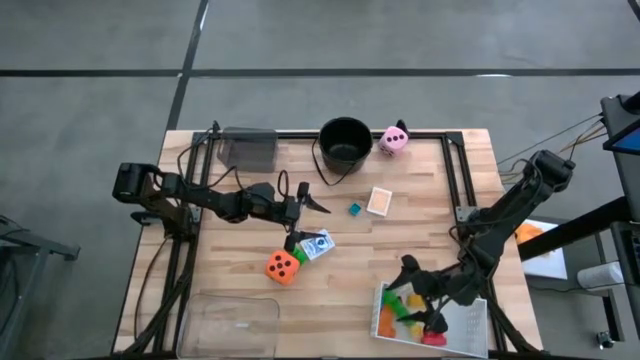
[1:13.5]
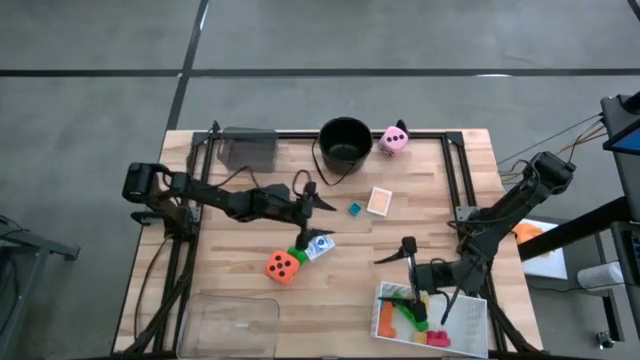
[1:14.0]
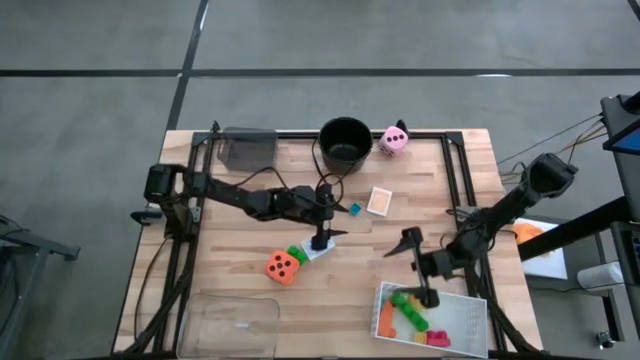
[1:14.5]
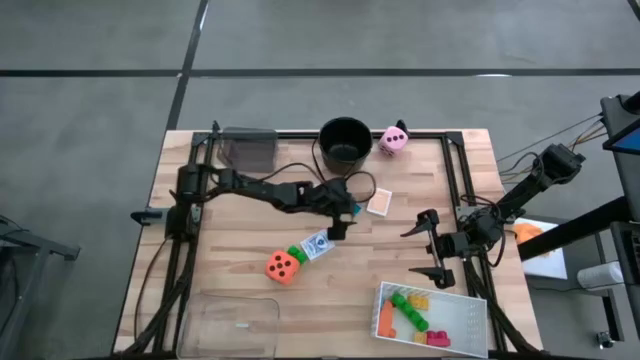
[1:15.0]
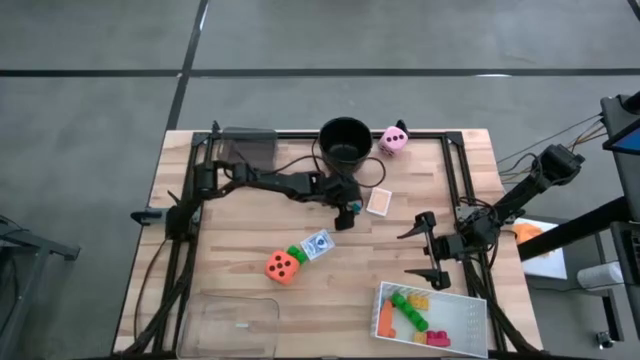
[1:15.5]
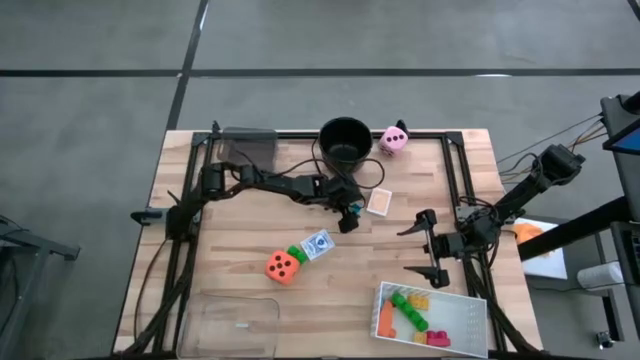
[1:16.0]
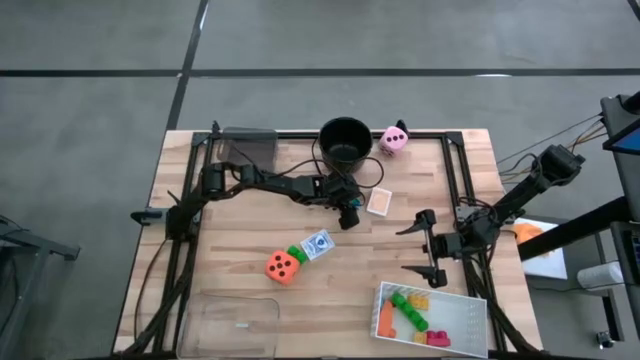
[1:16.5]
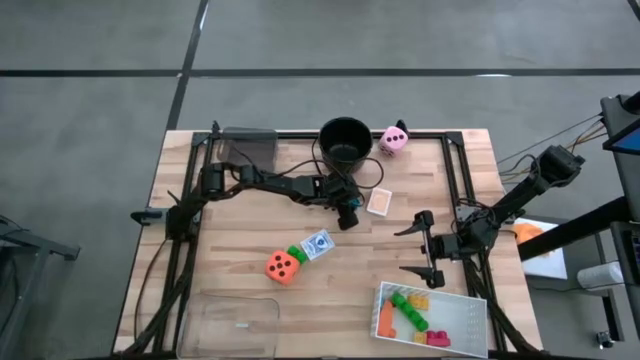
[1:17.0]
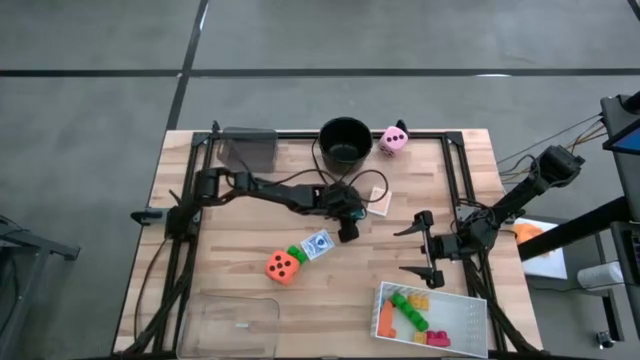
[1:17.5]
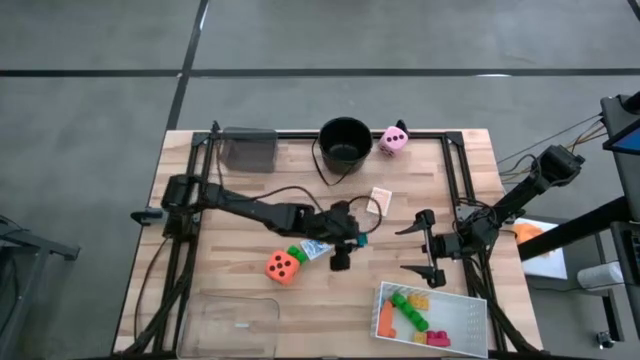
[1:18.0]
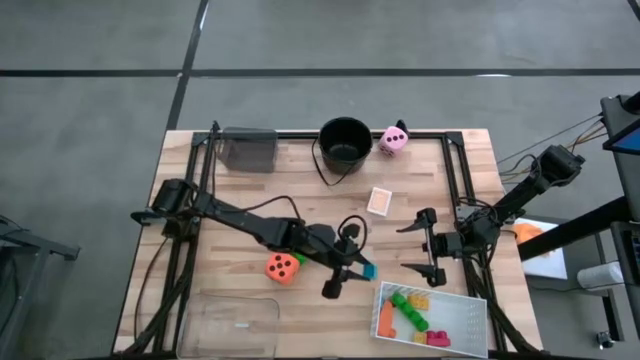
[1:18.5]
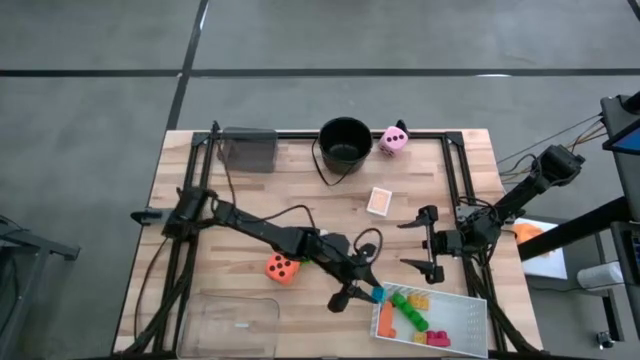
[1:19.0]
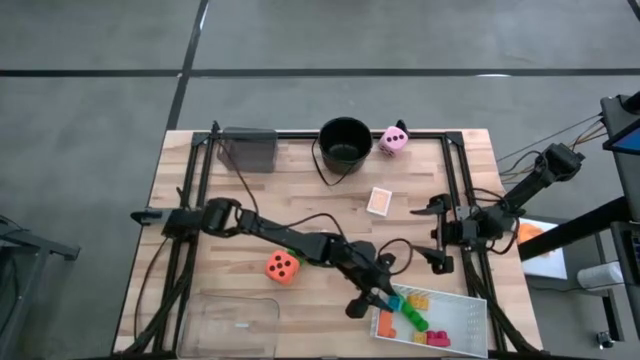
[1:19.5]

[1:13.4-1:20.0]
Task: Pick & Place Toys
Put the blue game piece into the white bin

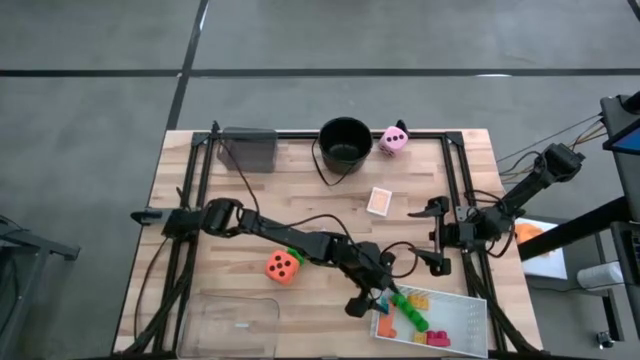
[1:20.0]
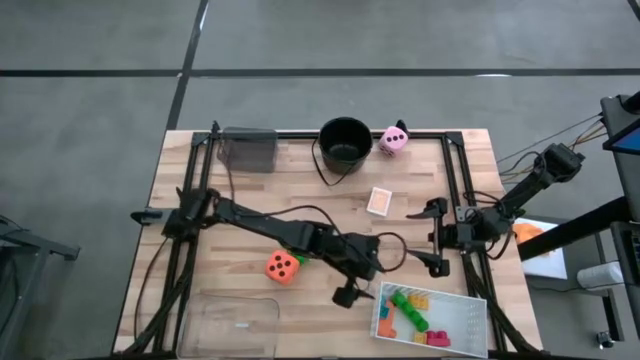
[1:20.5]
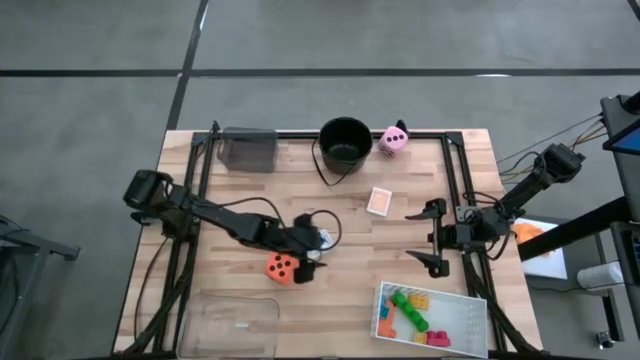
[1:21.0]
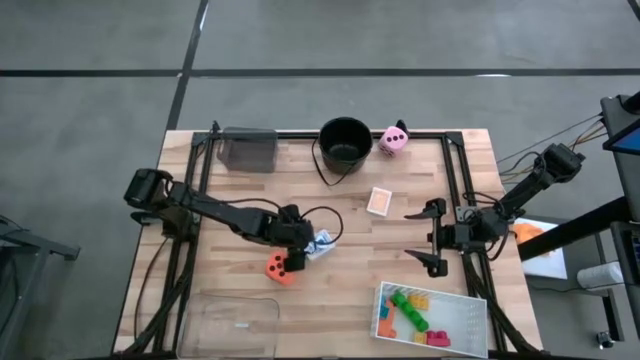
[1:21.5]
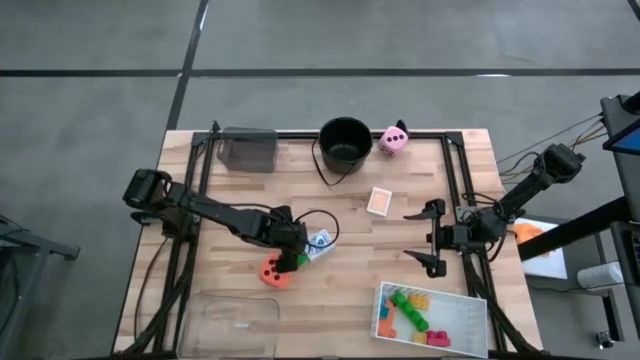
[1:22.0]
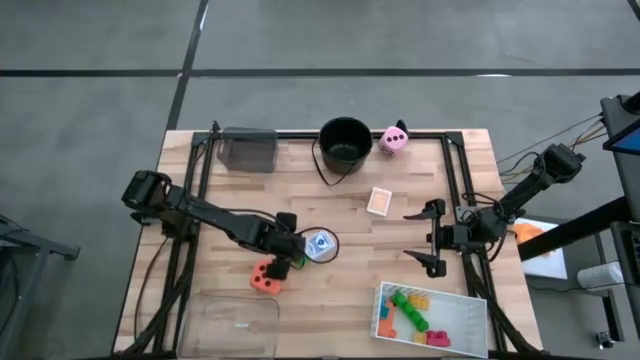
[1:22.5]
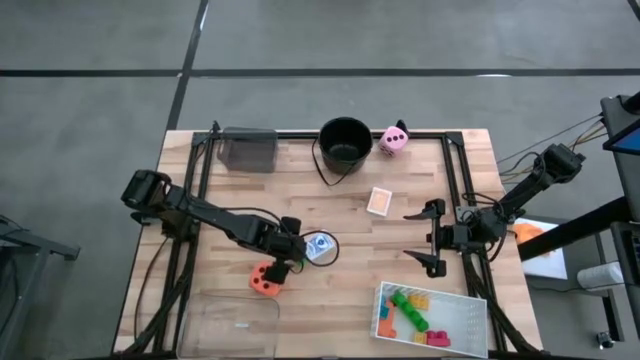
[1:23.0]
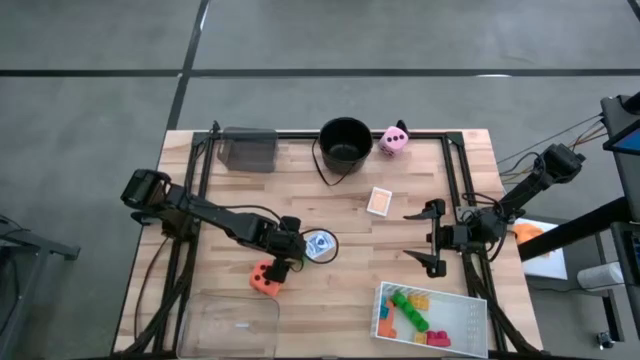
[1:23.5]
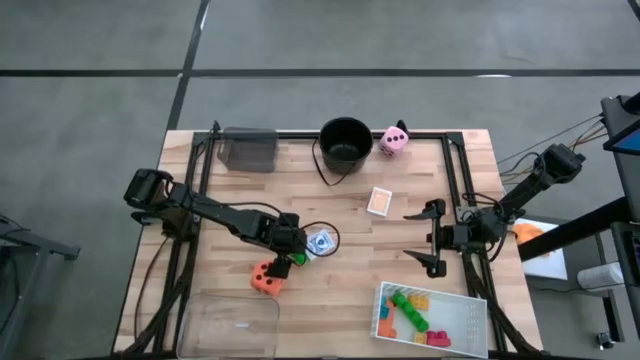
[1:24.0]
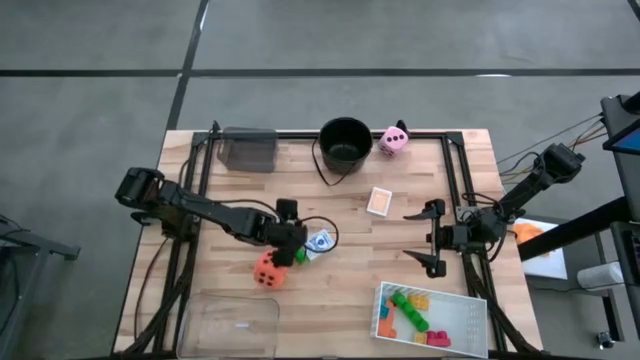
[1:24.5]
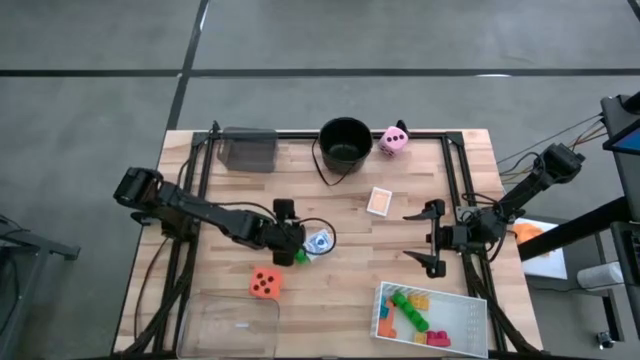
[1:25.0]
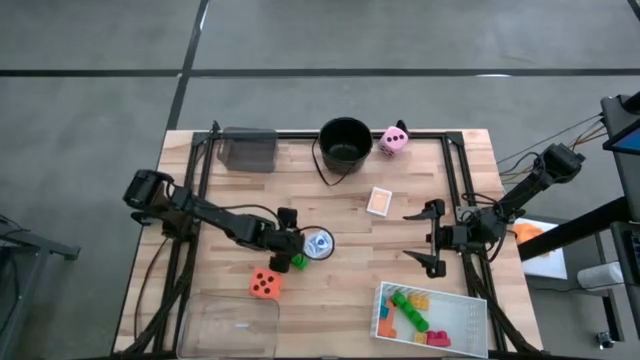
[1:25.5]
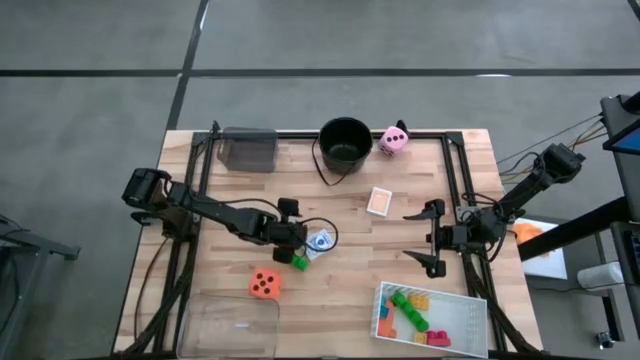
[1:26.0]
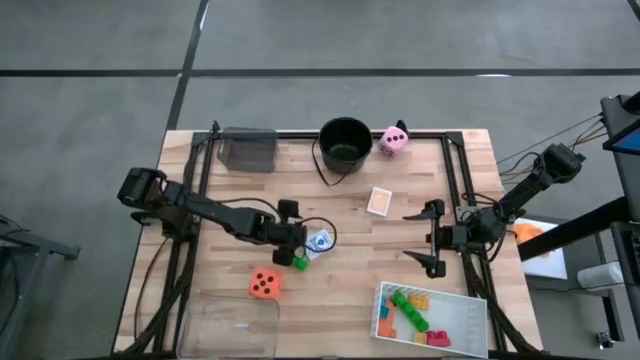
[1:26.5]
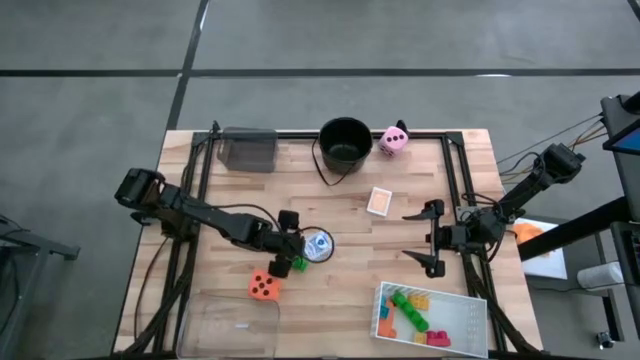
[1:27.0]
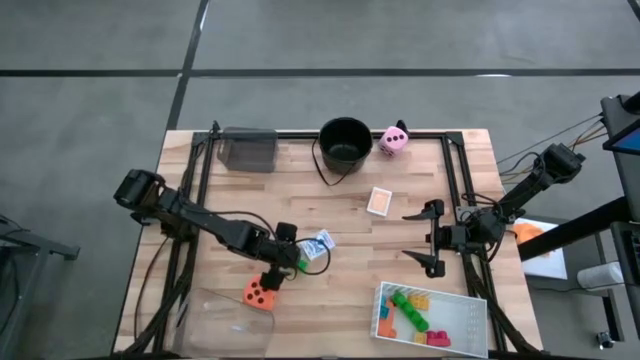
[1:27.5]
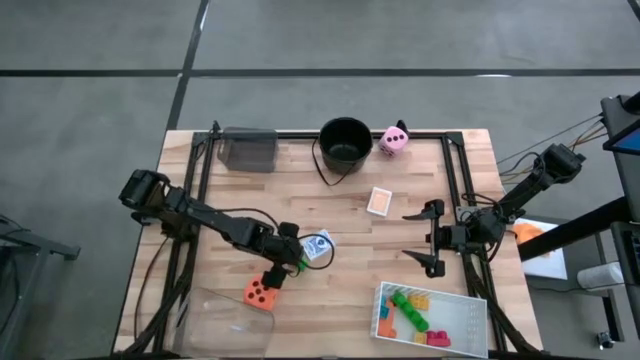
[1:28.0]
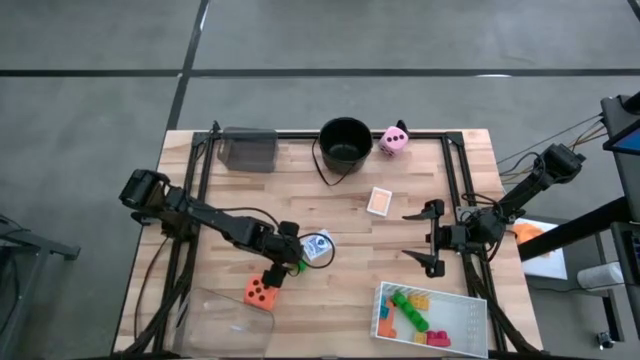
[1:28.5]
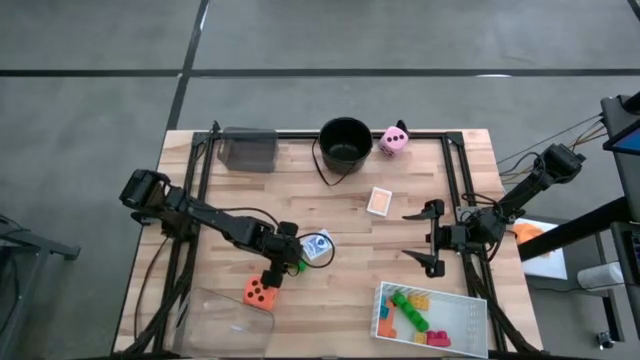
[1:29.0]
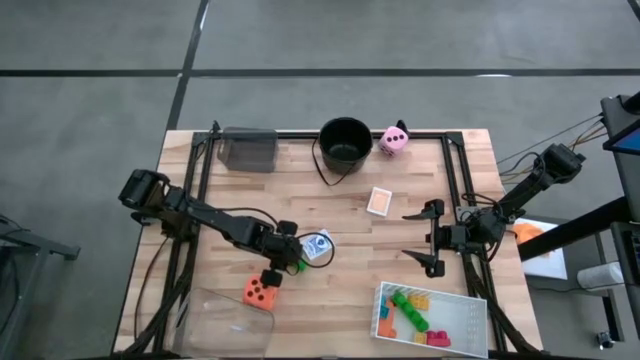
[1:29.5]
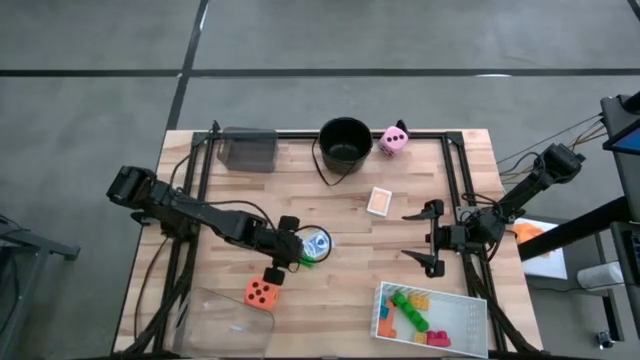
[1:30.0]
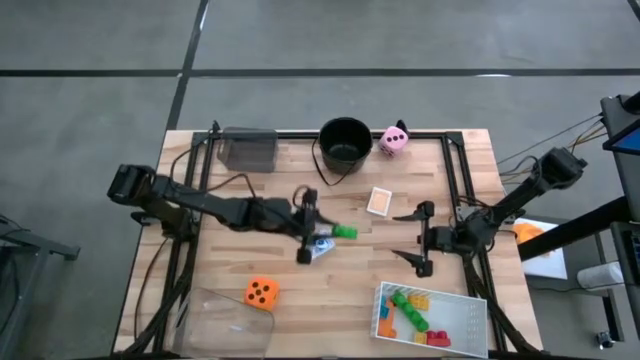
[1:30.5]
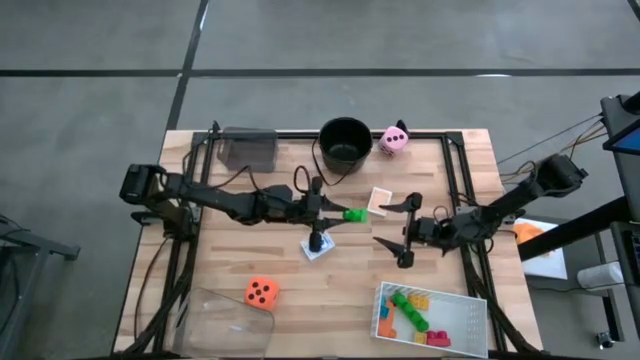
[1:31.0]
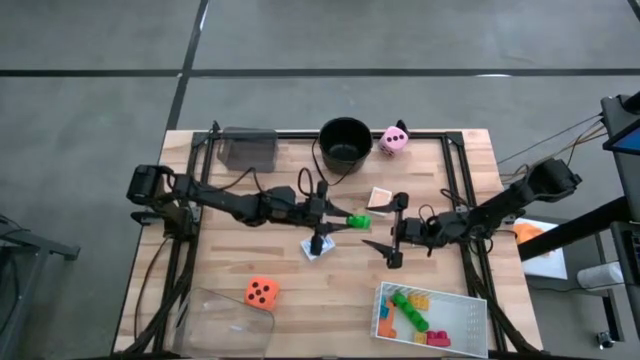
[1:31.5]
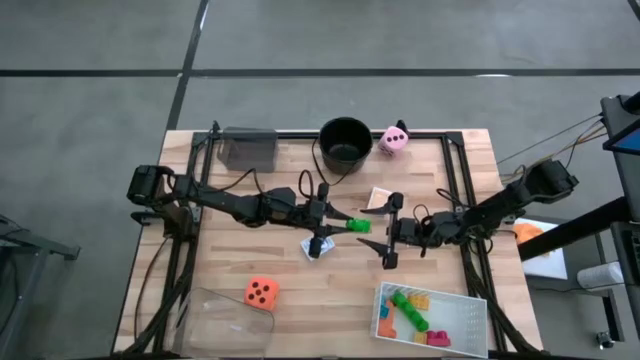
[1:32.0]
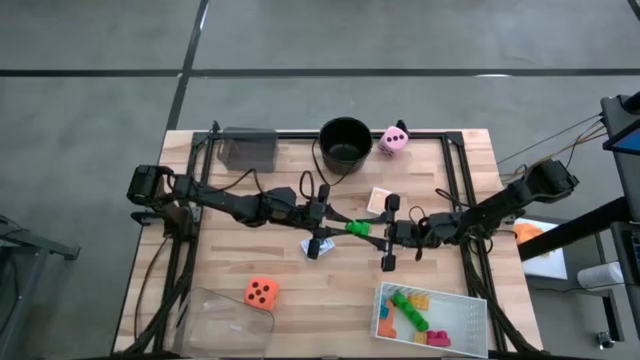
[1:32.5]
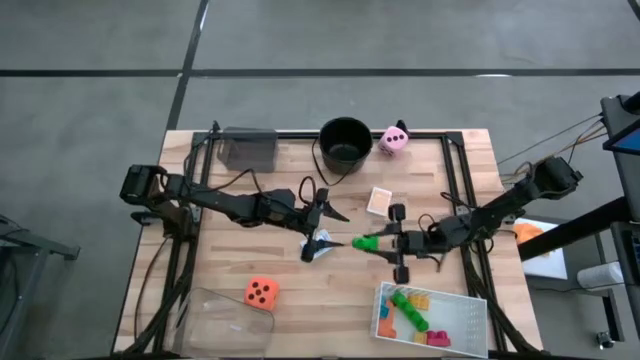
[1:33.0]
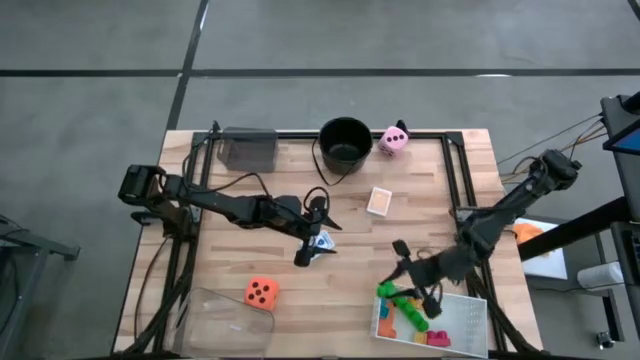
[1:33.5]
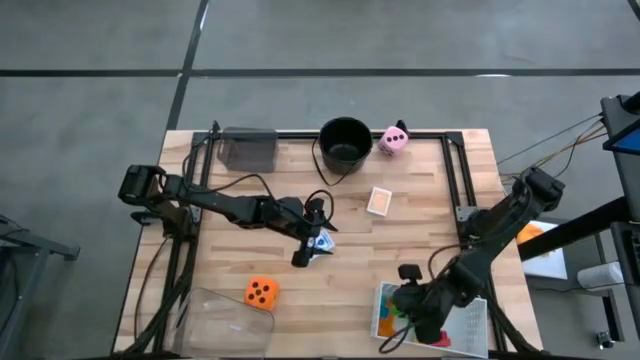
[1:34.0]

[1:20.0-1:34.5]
Put the green game piece into the white bin

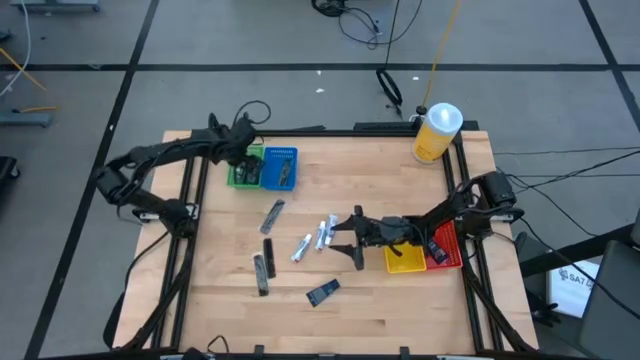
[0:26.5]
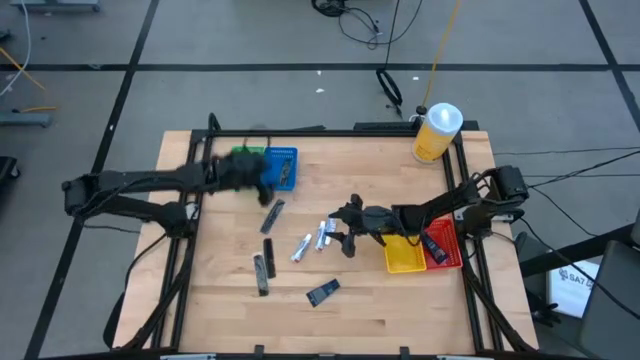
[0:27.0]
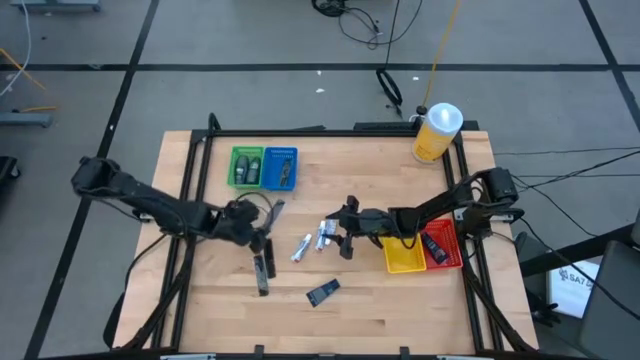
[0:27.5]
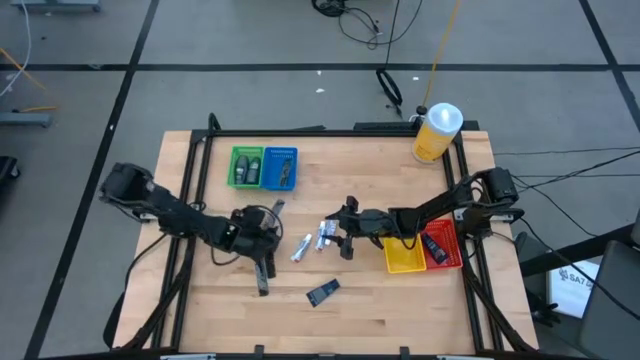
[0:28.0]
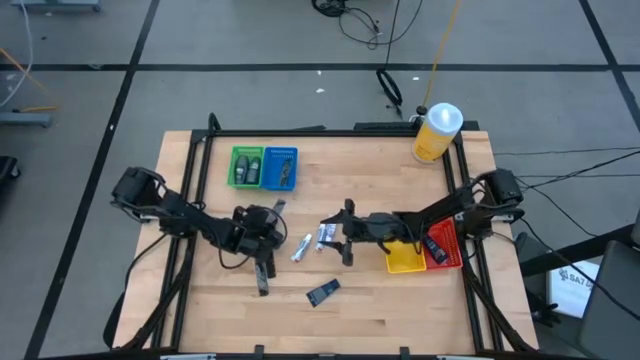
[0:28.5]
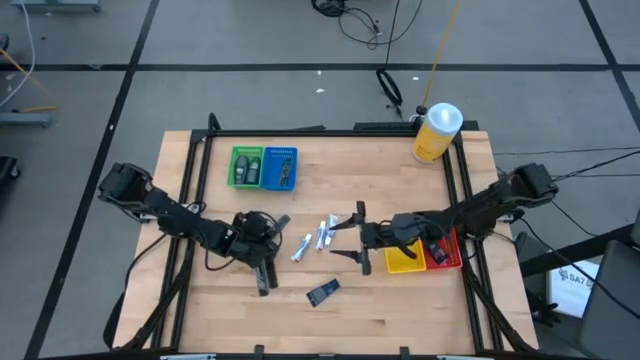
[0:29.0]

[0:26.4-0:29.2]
Task: Pick & Place Travel size toiletries
Put the black comb into the blue bin
